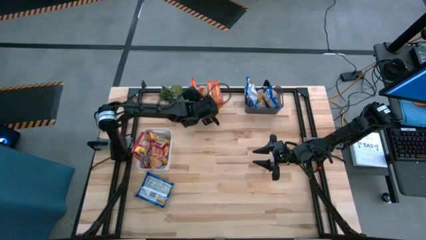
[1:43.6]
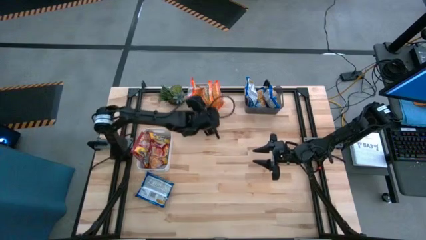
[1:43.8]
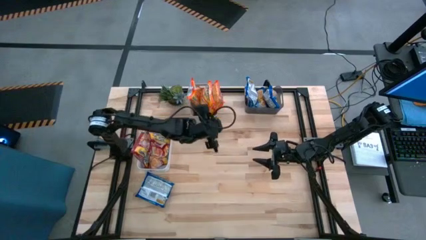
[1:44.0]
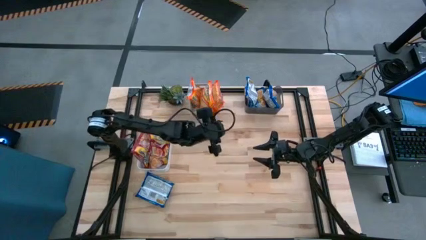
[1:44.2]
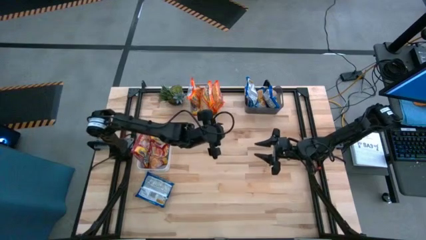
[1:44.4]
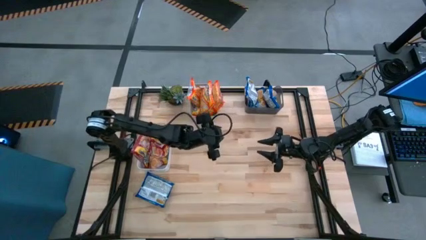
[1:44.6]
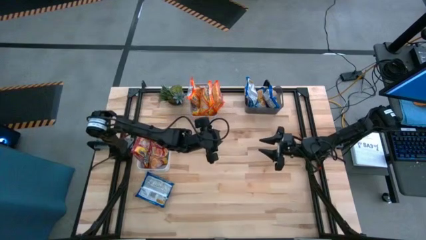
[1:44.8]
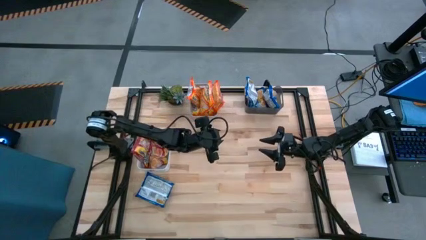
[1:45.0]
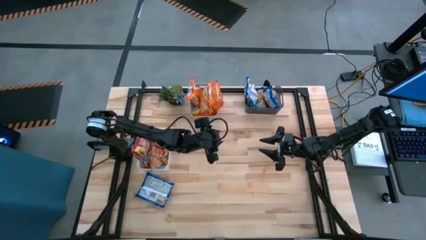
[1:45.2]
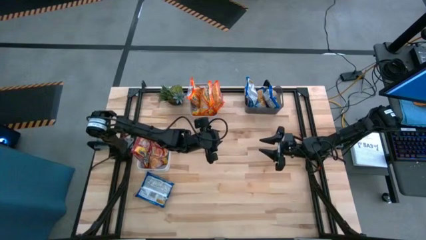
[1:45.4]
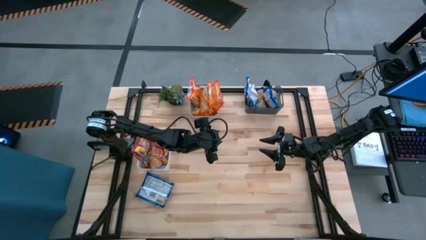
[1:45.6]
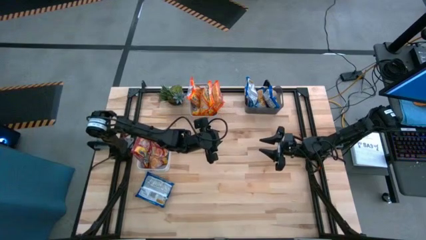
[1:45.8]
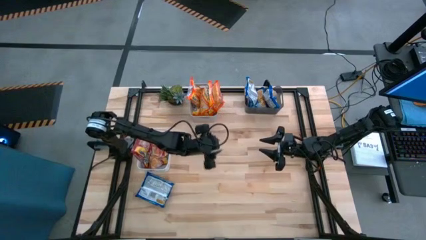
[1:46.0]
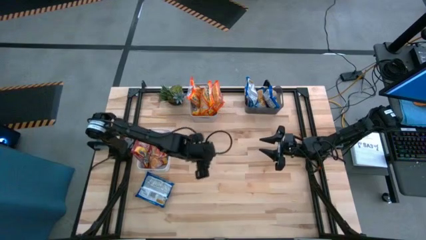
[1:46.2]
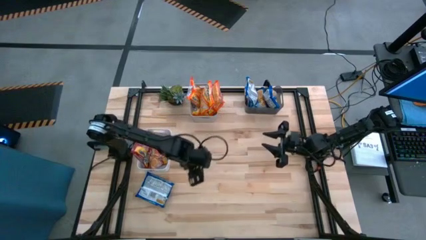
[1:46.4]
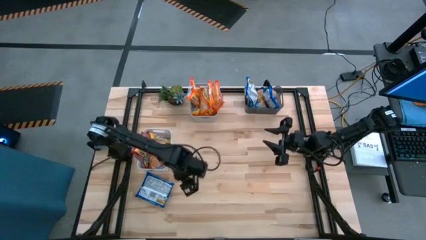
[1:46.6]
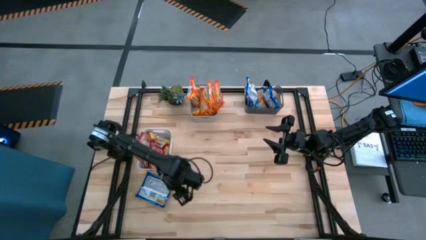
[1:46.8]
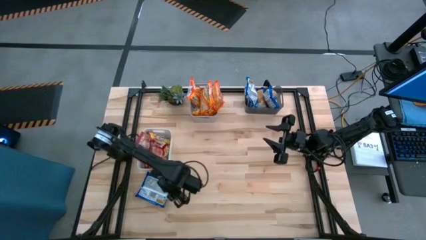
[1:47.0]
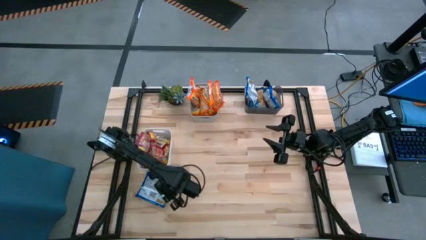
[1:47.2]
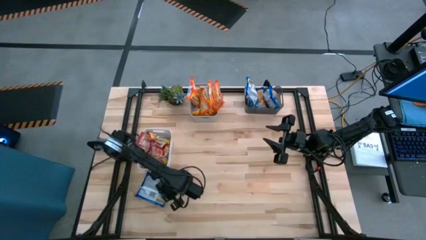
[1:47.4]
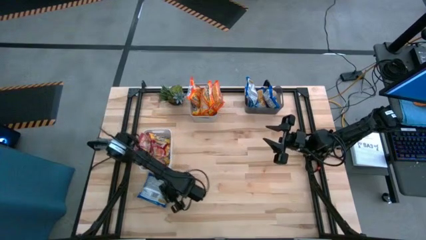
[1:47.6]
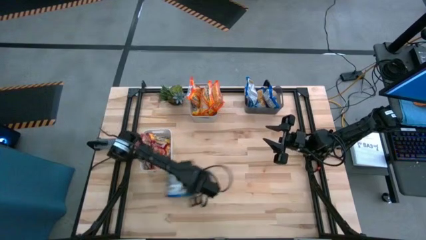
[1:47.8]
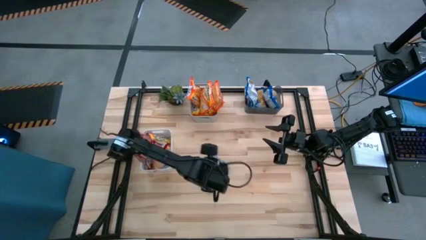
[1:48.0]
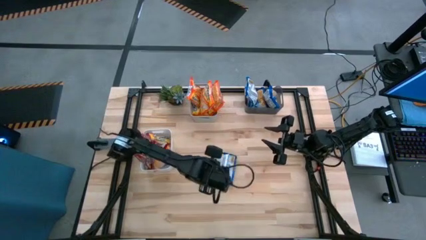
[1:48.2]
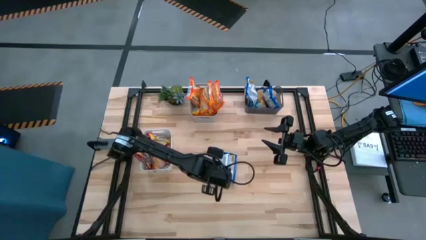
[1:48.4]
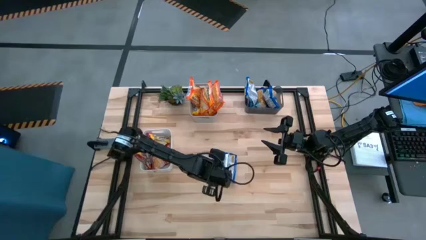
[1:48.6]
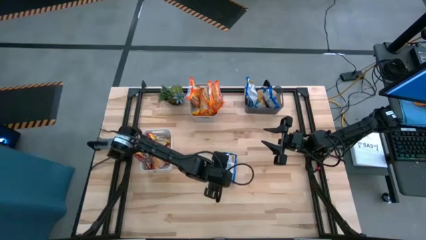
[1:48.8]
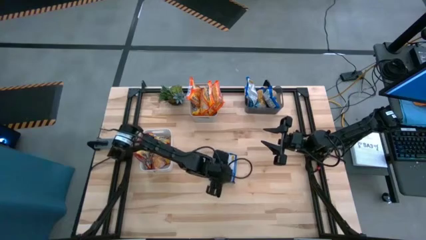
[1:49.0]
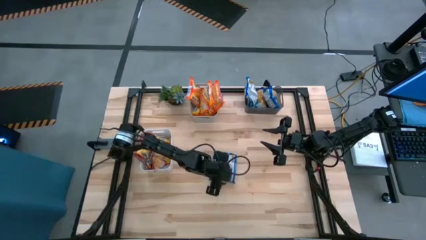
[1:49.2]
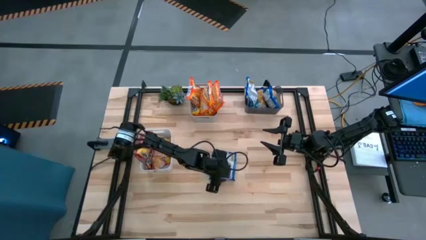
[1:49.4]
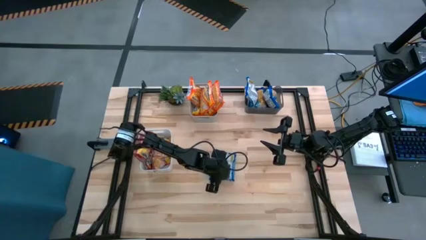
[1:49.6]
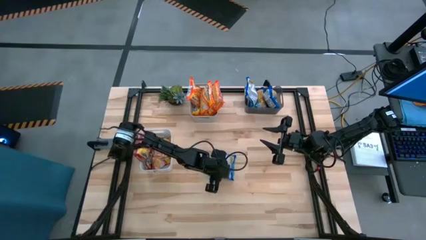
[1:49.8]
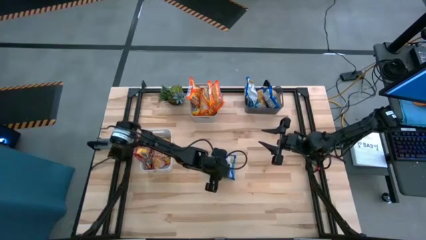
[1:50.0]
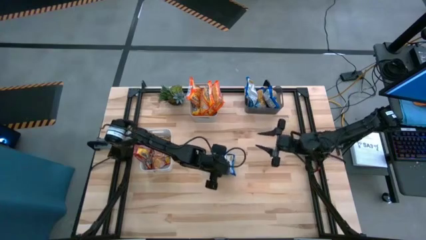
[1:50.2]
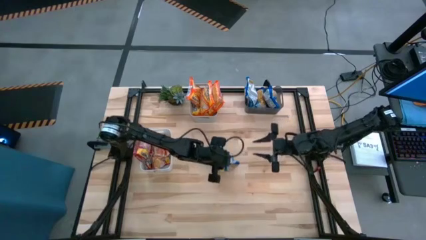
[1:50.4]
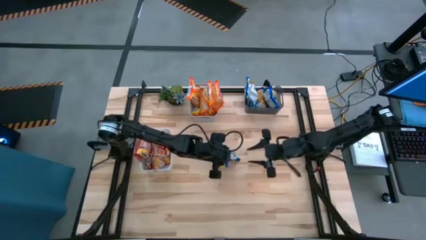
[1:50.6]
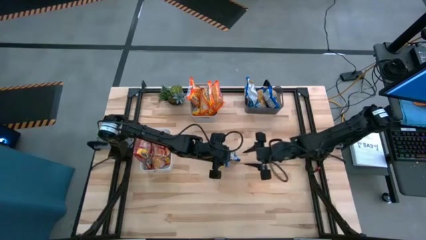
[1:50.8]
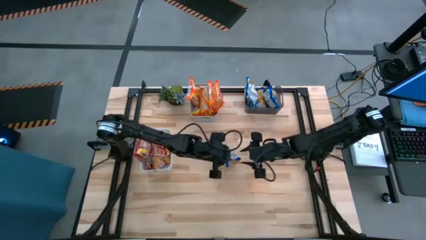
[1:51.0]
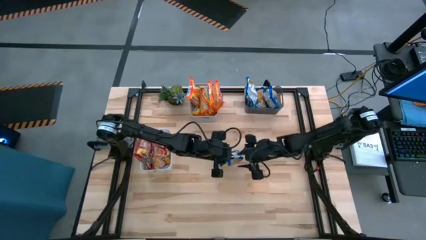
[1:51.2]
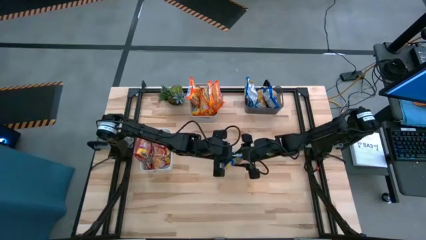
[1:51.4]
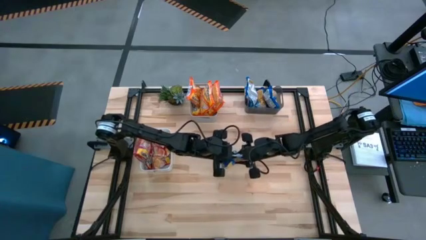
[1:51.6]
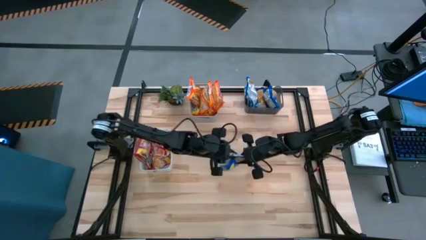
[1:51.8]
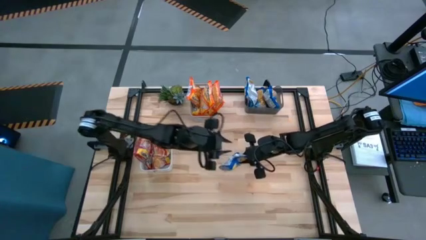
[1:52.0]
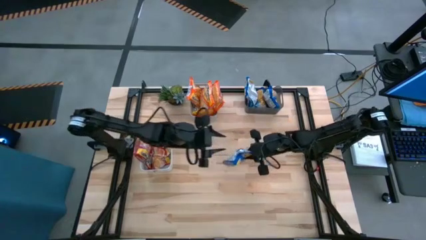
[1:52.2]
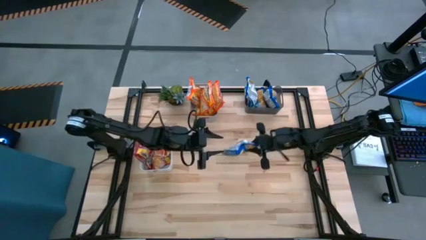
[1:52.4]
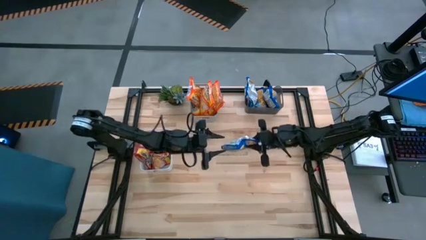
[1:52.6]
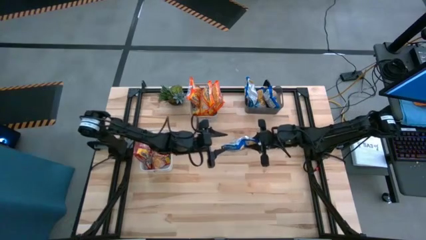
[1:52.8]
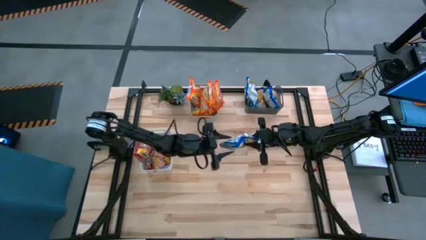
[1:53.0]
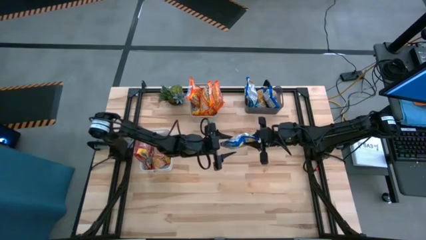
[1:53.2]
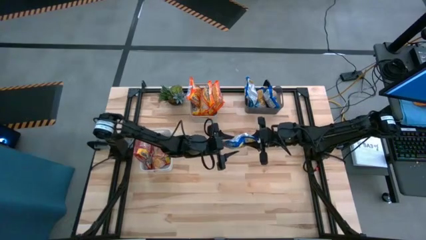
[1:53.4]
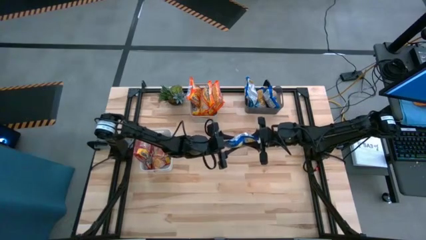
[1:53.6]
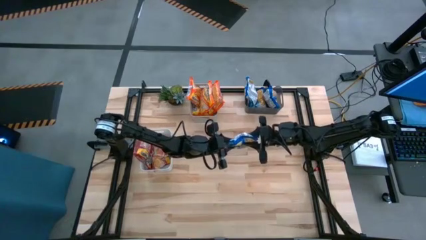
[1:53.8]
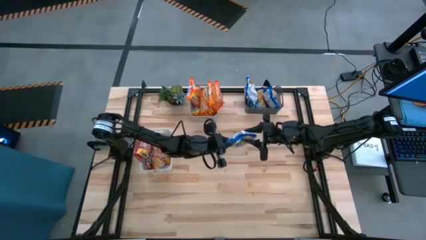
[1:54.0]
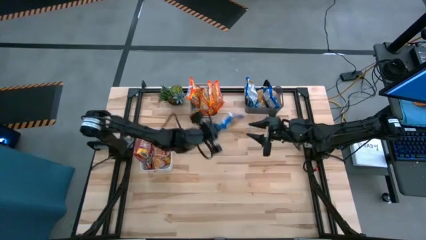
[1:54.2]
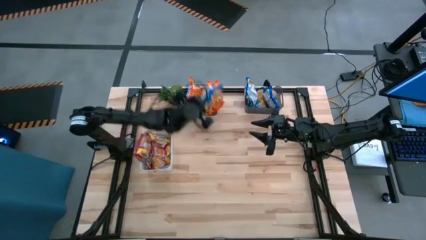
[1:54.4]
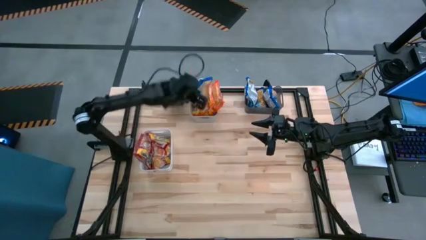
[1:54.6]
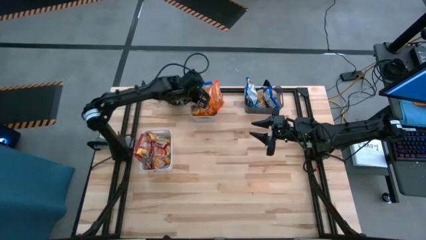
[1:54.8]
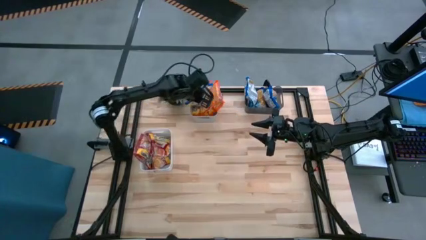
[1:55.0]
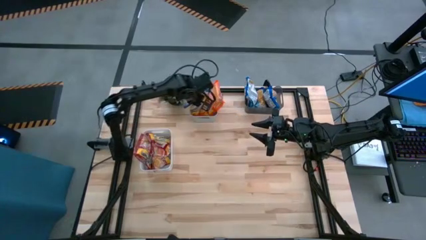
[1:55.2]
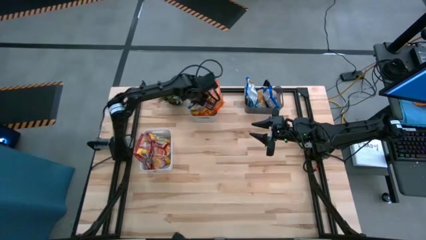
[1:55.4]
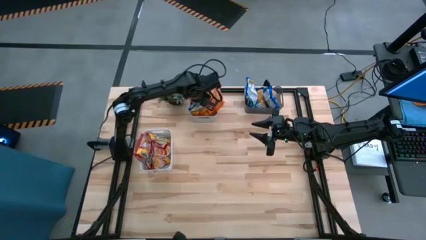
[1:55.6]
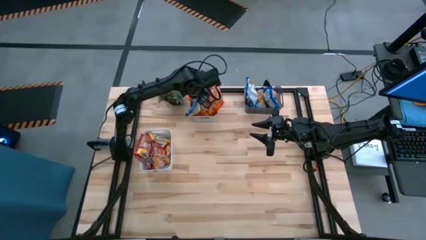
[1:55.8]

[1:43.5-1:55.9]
Task: Sort Maruchan noodles
Put the blue noodle pack into the black bin

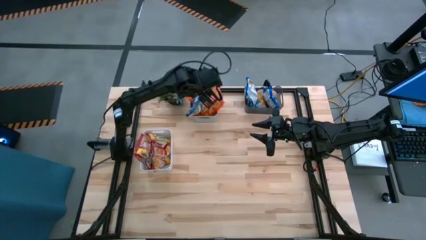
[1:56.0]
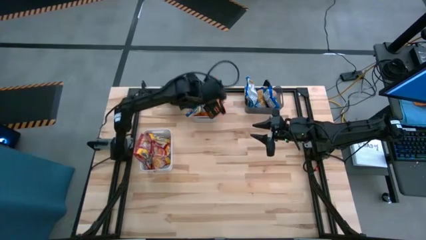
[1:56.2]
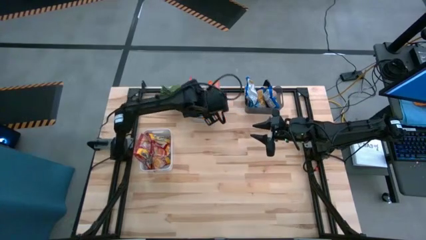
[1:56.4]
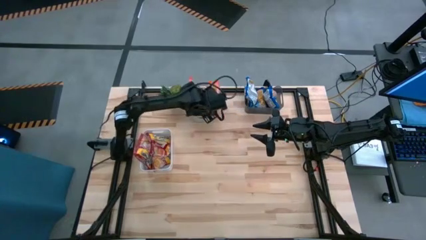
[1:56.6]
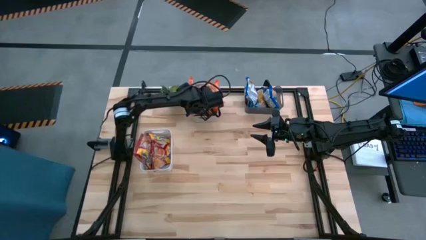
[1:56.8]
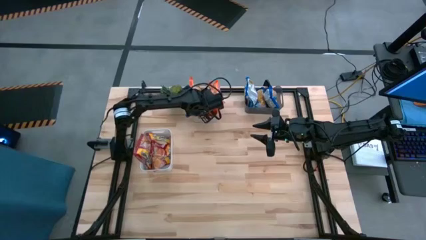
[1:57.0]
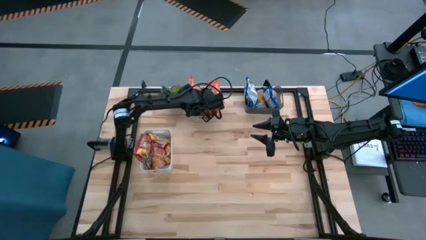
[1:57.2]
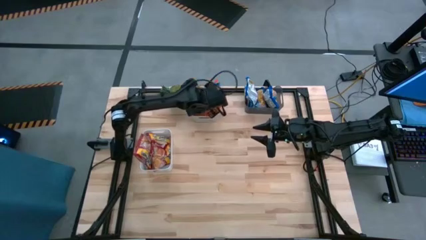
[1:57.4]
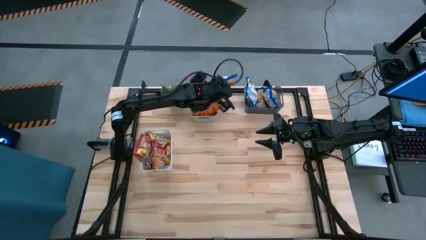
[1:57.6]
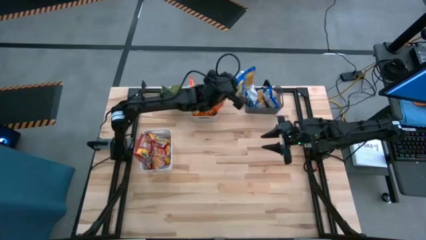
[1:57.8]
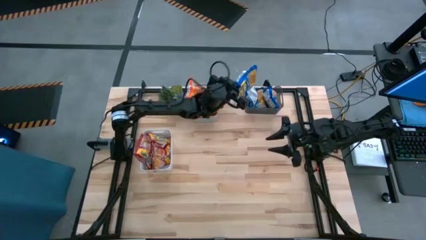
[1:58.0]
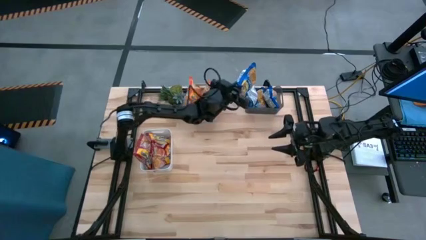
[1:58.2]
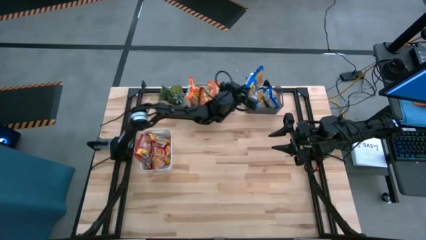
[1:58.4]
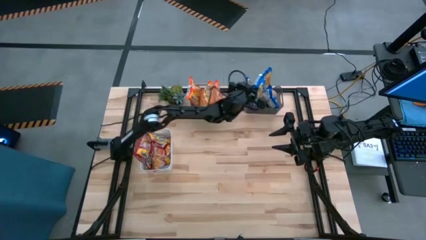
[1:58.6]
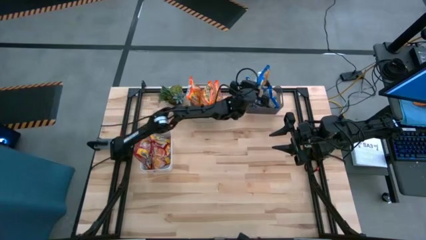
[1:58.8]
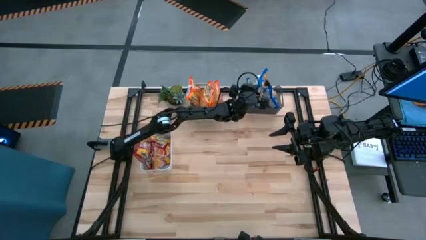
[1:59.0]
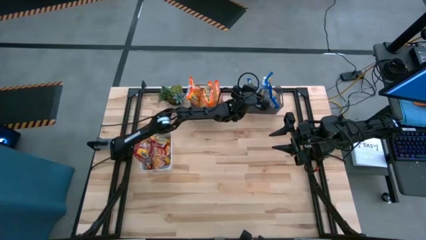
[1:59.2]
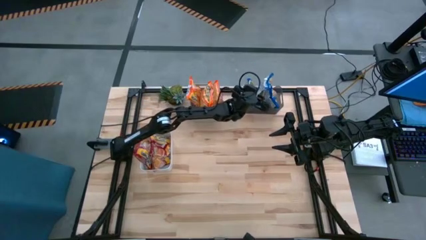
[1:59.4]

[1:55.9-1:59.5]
Put the blue noodle pack into the black bin
